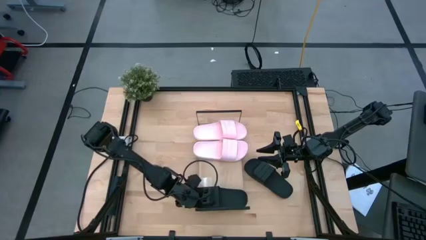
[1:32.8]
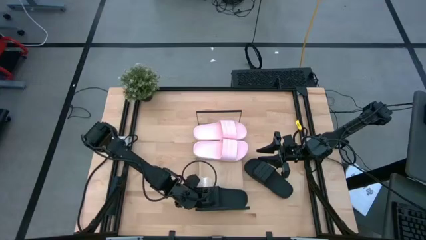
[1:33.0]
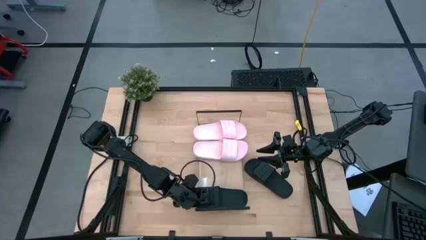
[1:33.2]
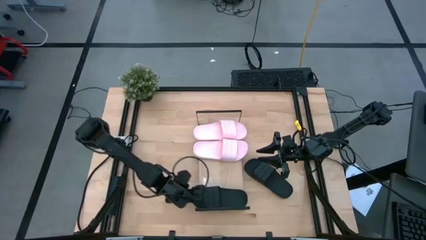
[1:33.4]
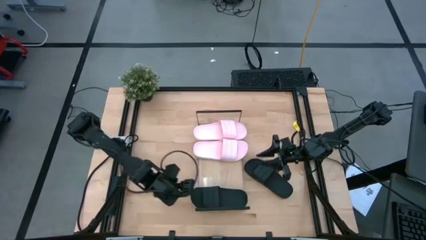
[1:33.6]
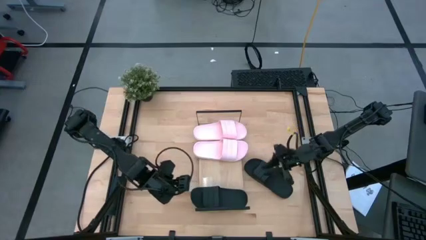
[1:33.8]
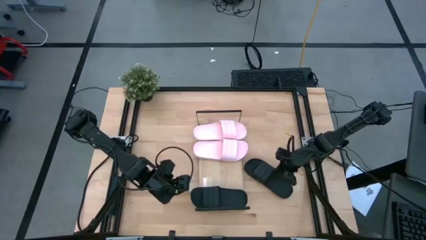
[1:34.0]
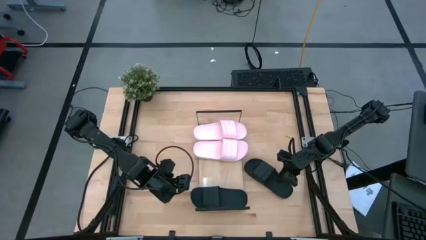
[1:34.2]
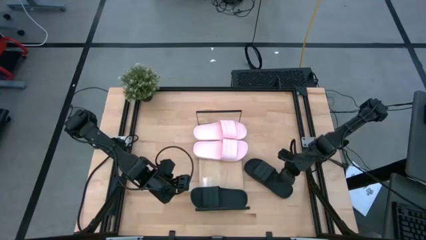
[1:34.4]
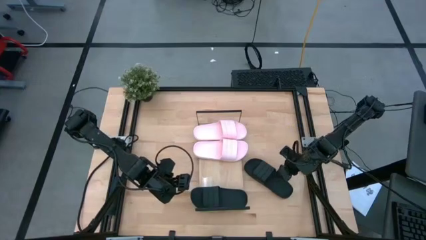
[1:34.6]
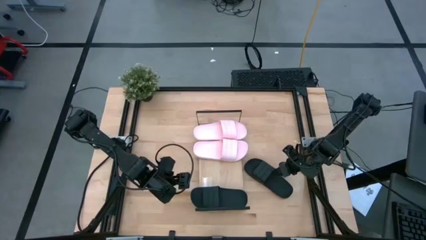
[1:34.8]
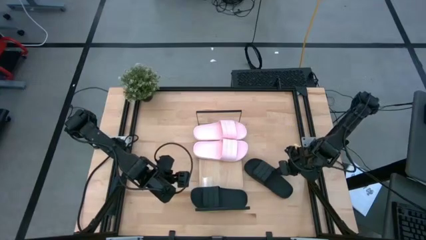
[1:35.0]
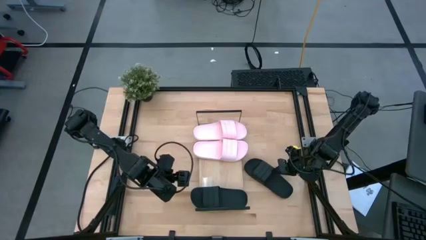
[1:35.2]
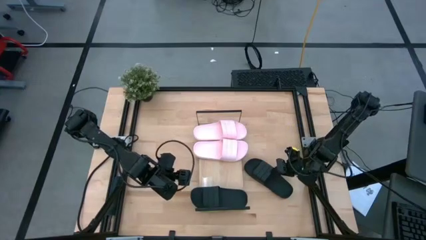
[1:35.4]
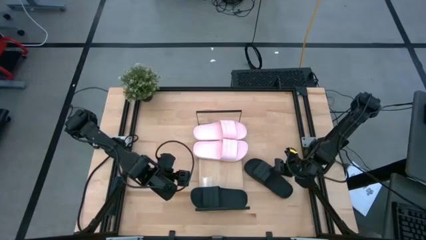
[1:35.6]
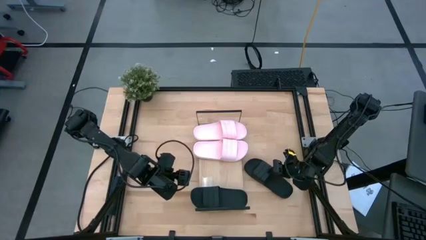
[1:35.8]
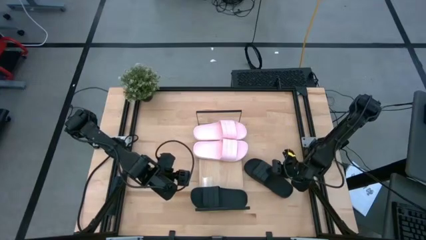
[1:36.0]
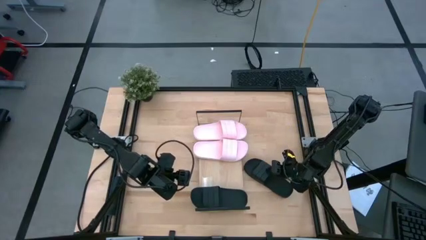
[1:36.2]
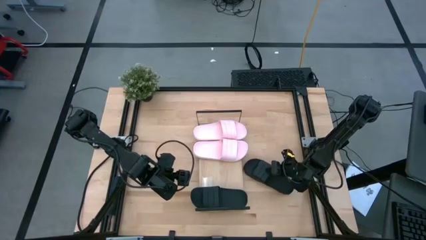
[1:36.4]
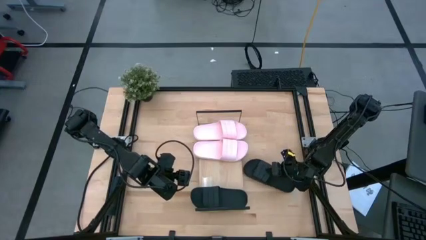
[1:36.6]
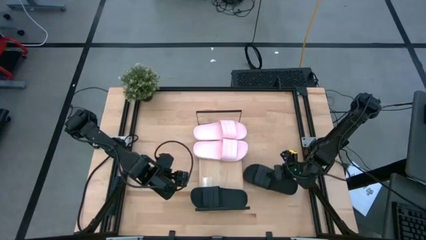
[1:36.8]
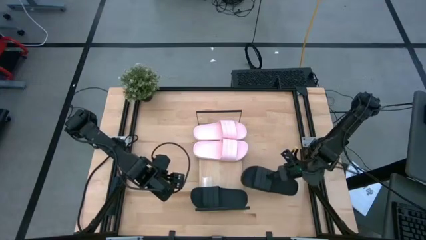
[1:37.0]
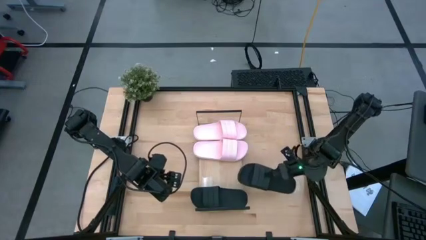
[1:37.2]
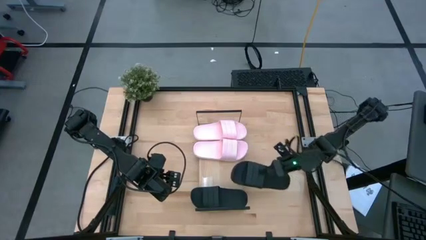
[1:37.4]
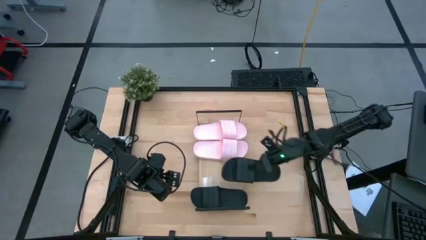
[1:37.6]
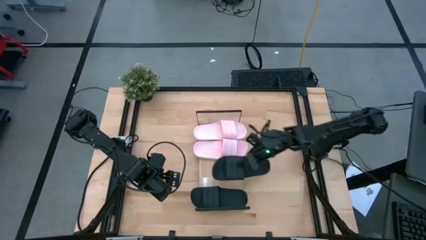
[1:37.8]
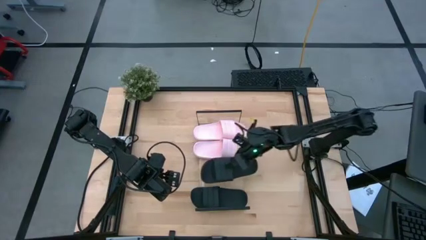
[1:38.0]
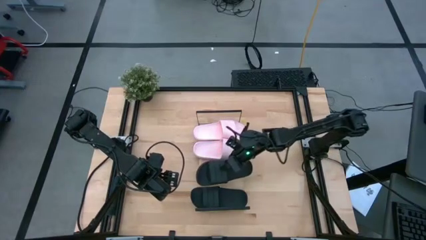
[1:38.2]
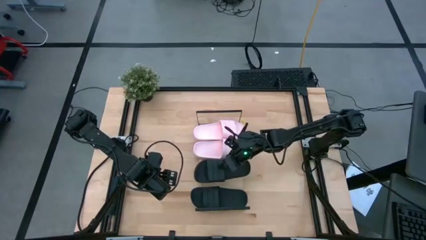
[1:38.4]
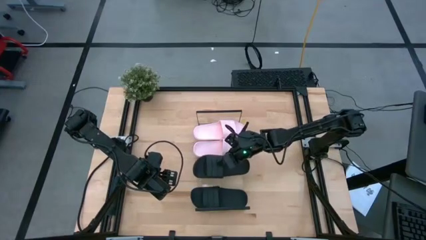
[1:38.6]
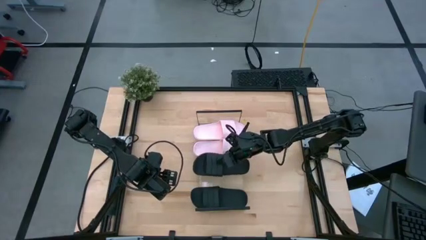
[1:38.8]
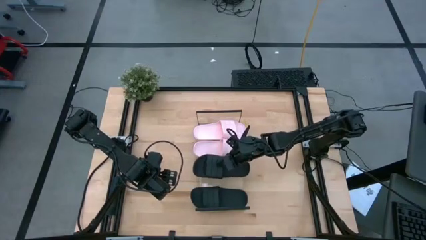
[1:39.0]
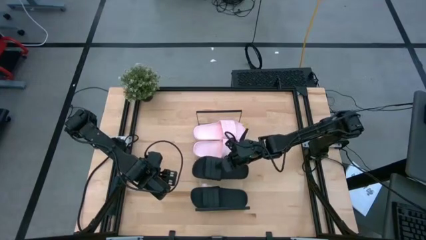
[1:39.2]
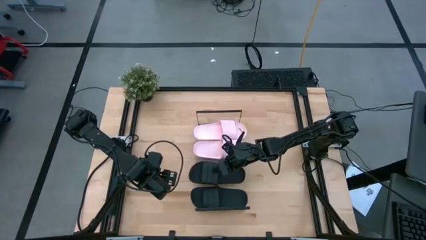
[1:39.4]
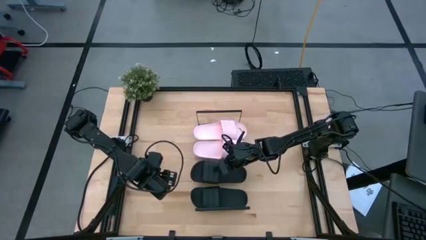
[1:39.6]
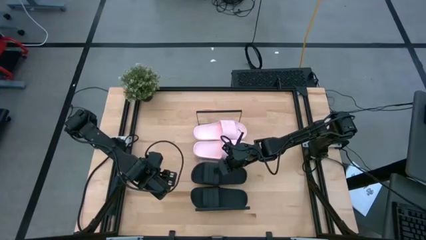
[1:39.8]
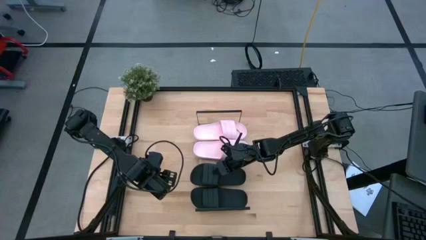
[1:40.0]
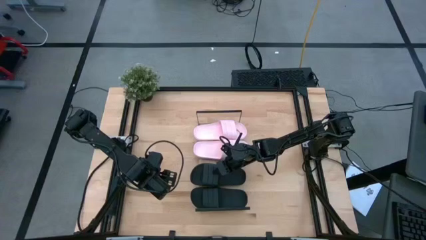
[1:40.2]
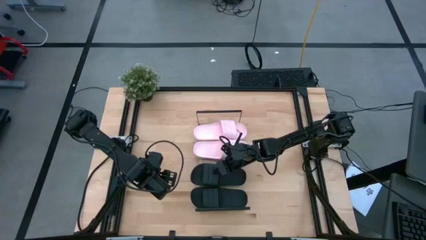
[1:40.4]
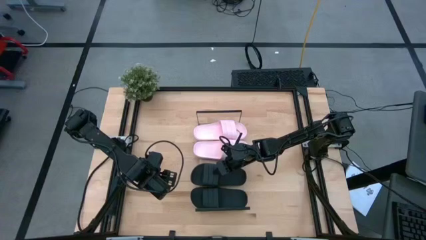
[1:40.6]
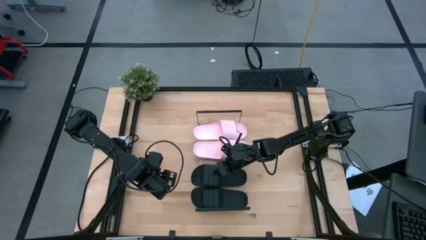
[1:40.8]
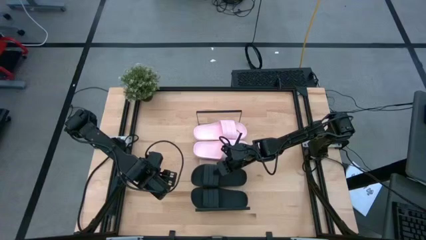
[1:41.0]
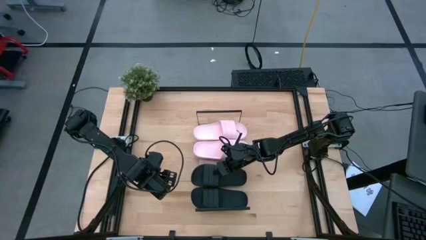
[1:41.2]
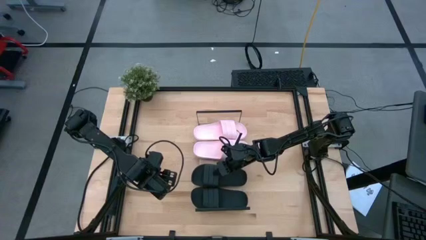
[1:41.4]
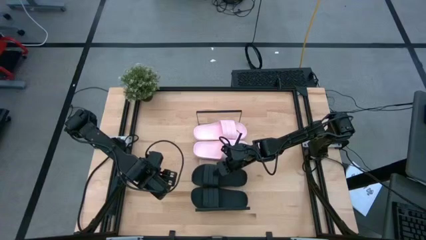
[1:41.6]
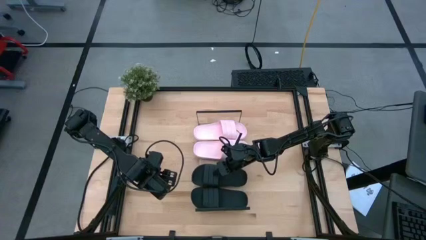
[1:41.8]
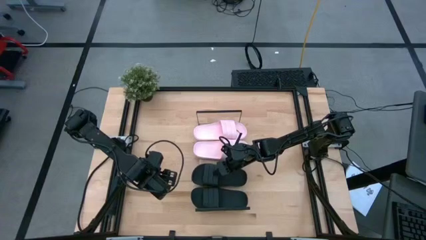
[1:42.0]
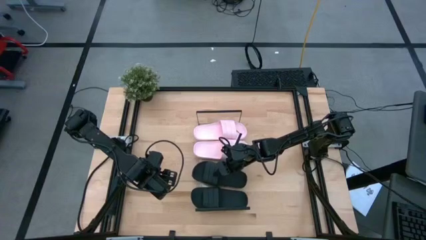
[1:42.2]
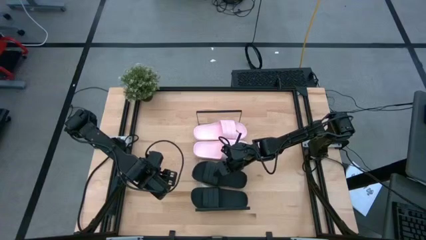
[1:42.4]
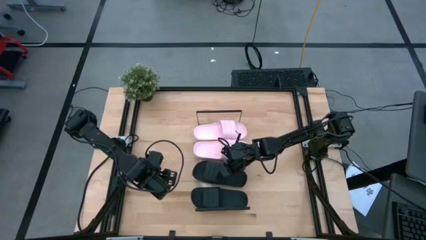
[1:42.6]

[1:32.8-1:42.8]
Task: Pick and place slides into the shelf
Put the black slide on the shelf

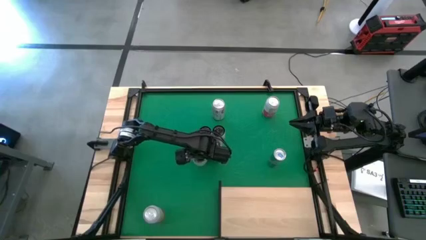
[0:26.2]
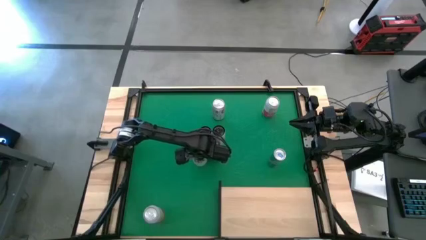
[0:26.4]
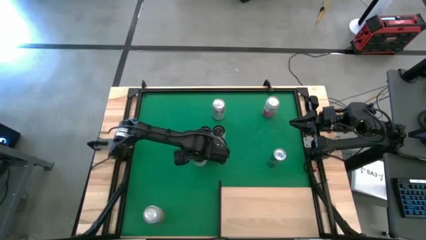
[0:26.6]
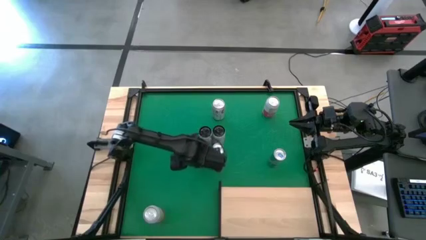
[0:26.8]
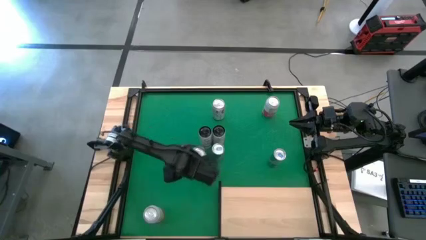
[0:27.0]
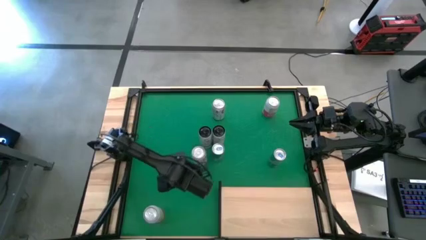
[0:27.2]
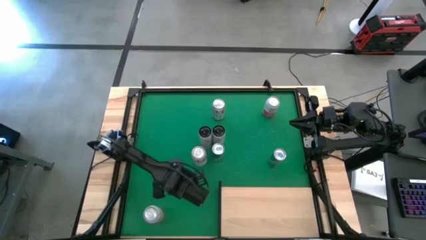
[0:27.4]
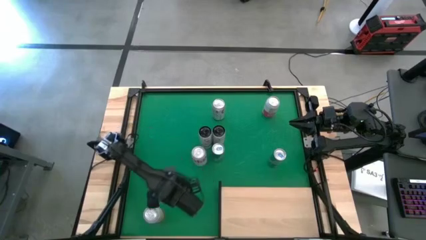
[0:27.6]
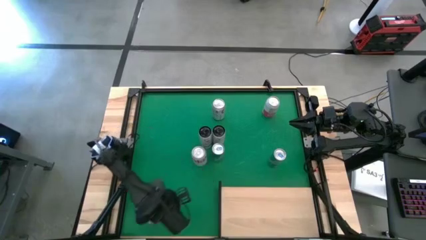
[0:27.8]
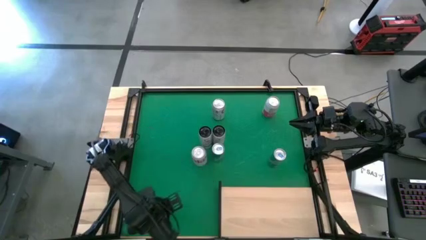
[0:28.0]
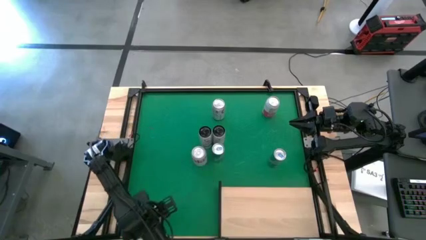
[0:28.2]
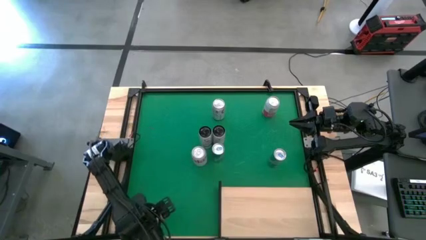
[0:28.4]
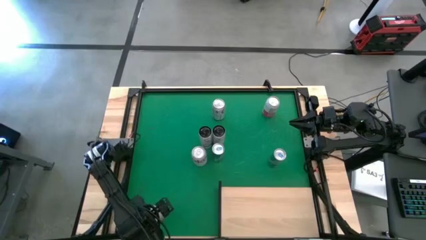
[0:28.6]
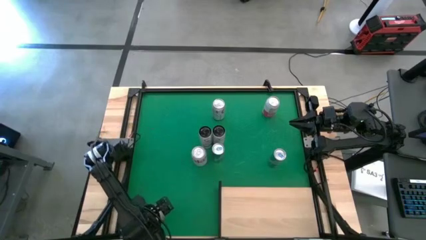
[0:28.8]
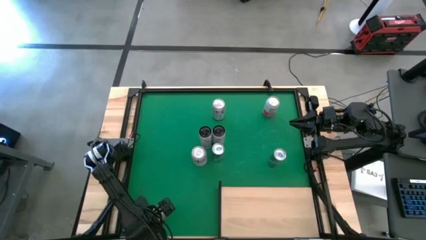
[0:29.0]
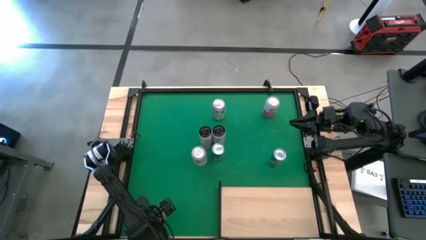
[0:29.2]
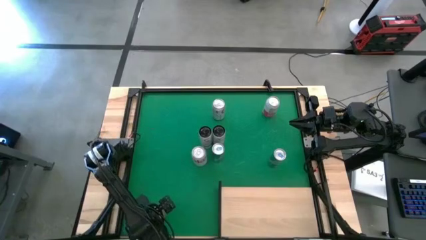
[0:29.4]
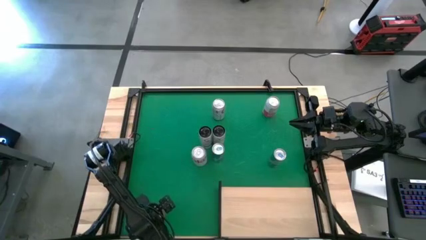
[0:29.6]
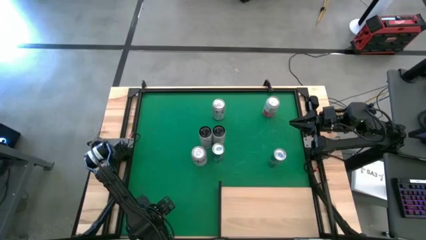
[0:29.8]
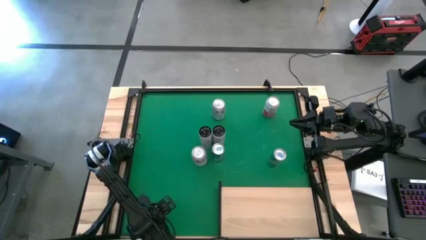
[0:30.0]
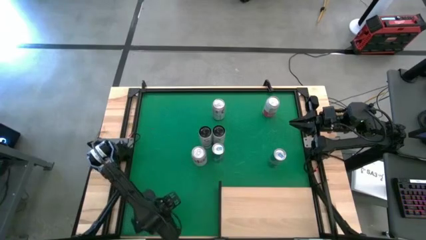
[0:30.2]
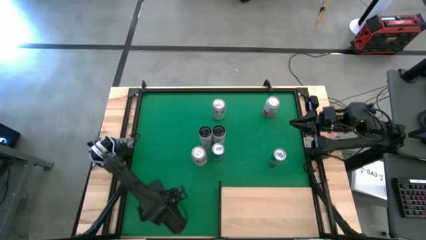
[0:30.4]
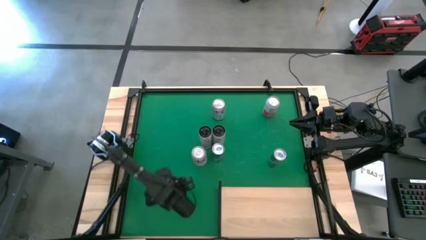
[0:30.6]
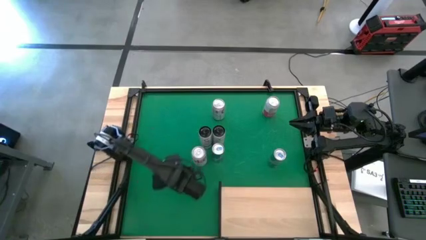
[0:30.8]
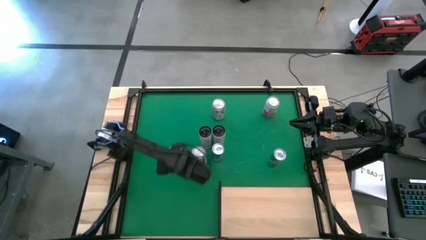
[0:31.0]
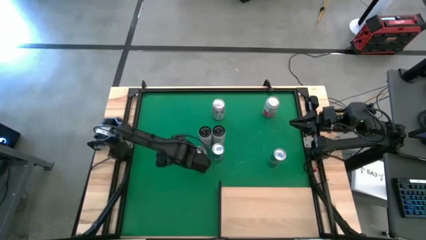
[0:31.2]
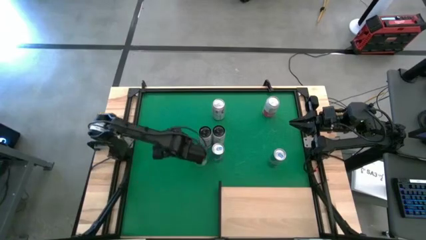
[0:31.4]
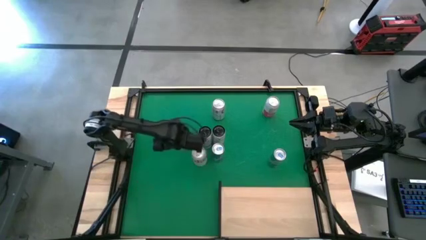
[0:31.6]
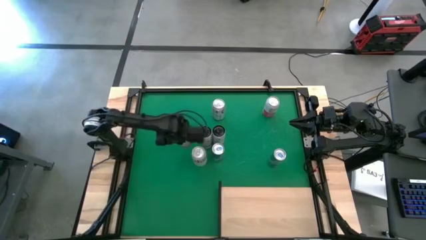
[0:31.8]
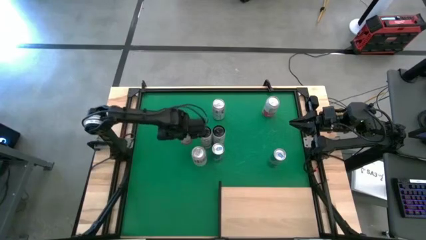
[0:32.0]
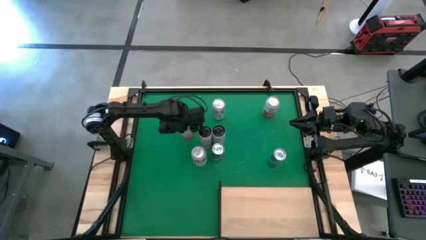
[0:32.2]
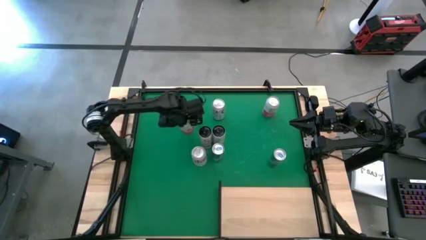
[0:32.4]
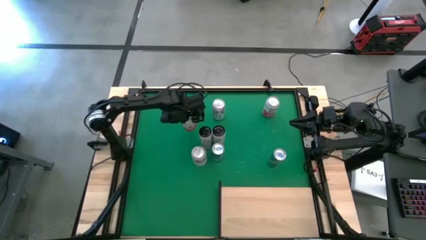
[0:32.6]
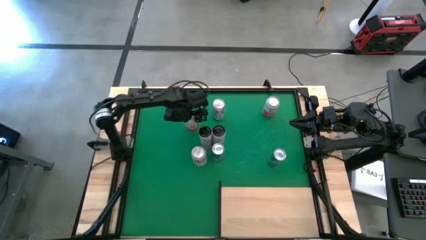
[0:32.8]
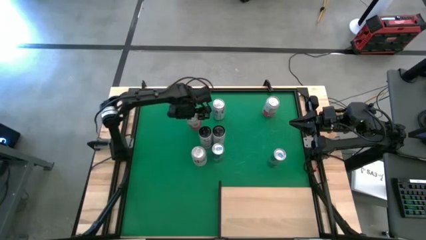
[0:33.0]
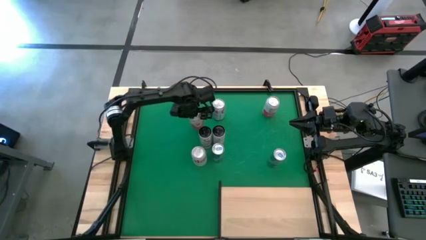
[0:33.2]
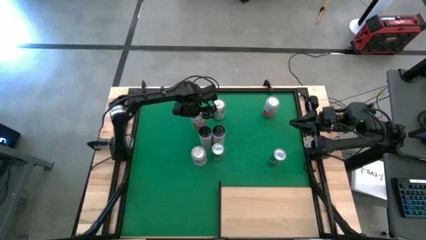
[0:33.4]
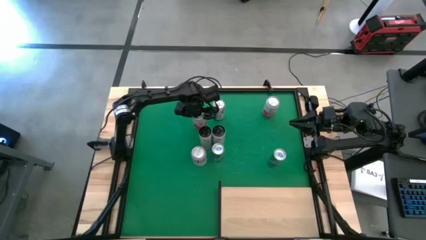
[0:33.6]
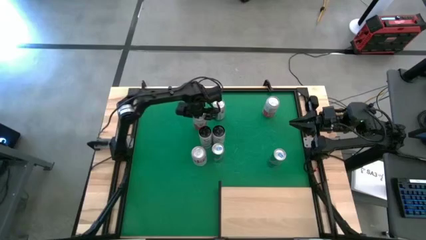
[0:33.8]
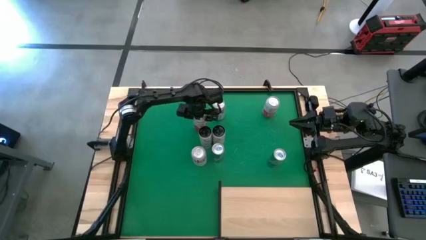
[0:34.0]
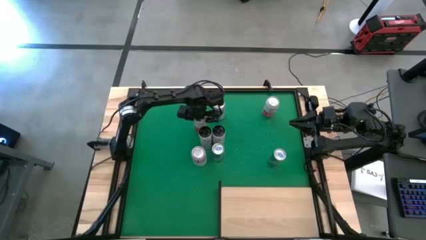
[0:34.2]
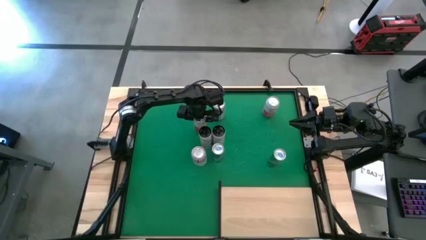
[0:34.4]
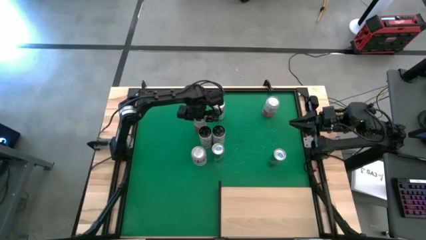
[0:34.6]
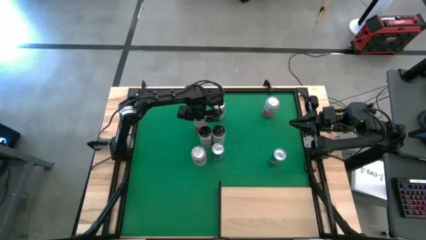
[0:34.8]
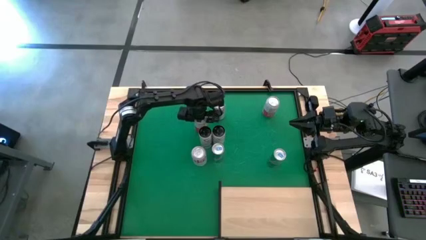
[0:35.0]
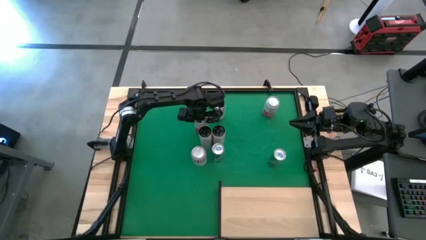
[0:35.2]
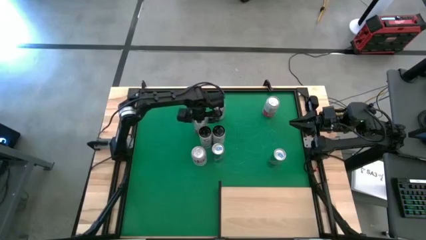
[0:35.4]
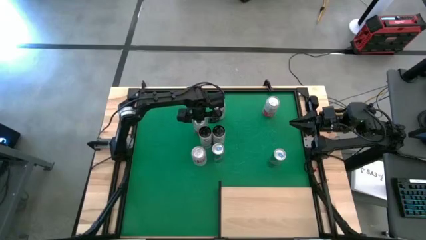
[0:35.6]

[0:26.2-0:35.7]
Task: Place canned beverage on shelf
Move the bottom pink white soda can to the middle of the table
